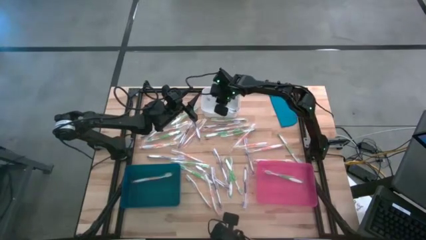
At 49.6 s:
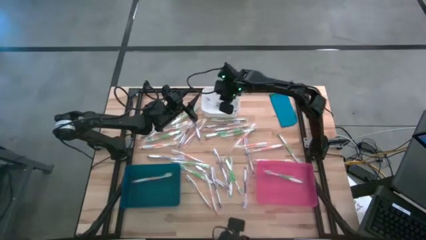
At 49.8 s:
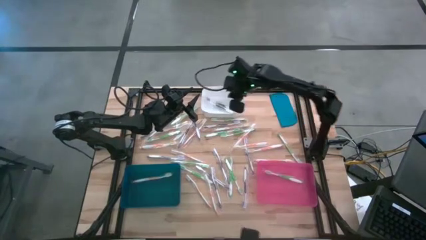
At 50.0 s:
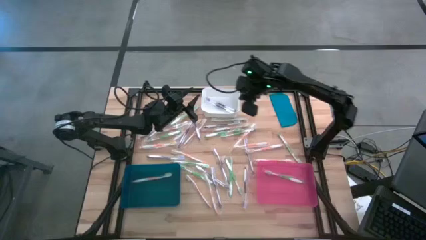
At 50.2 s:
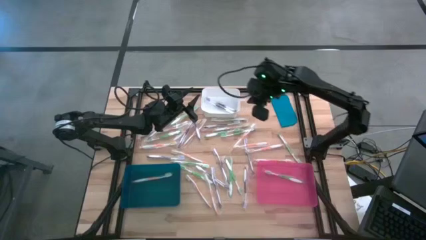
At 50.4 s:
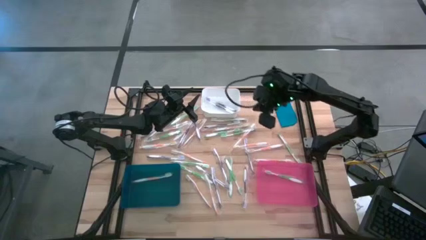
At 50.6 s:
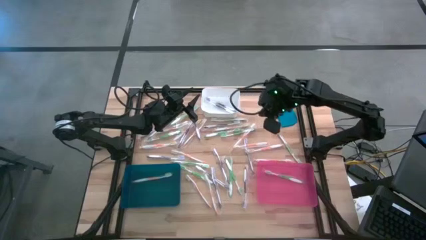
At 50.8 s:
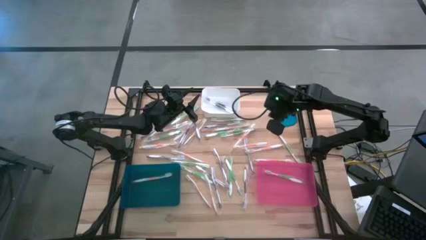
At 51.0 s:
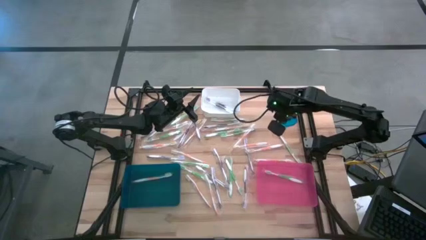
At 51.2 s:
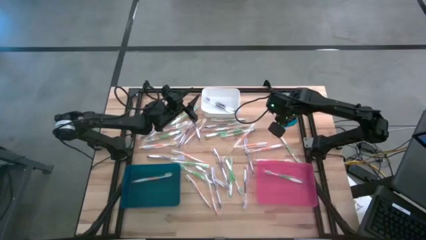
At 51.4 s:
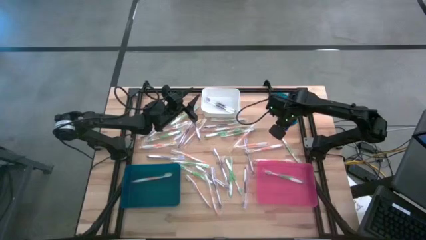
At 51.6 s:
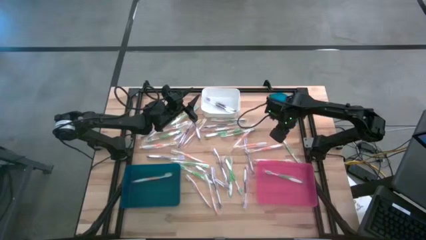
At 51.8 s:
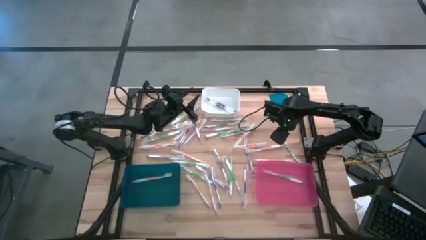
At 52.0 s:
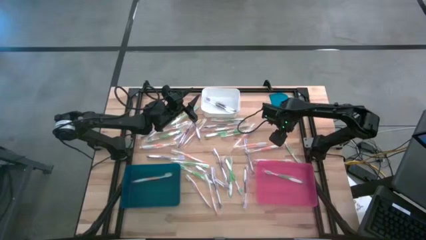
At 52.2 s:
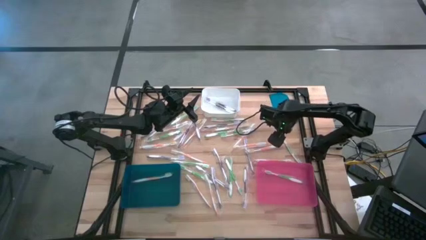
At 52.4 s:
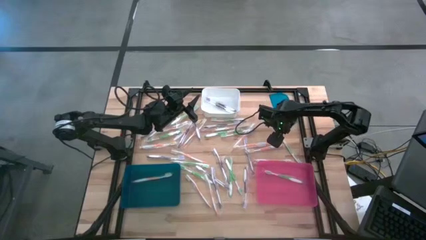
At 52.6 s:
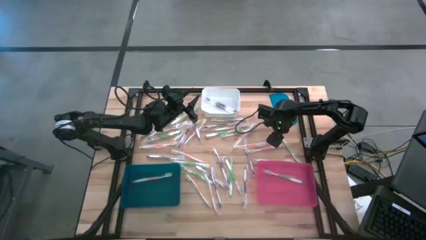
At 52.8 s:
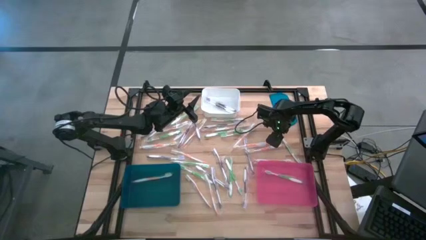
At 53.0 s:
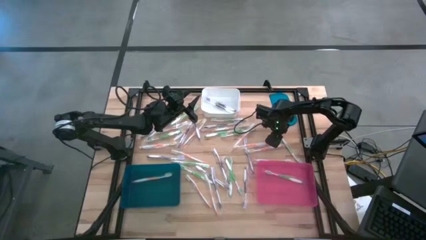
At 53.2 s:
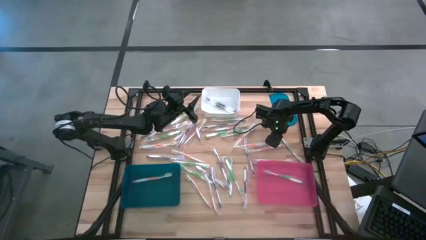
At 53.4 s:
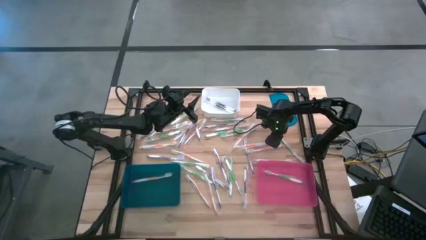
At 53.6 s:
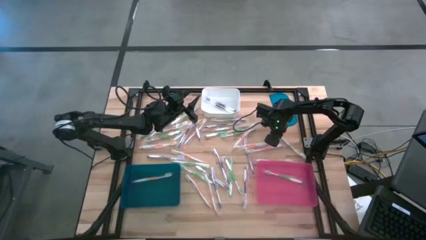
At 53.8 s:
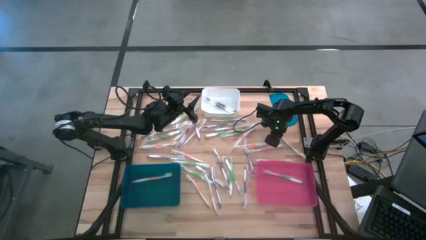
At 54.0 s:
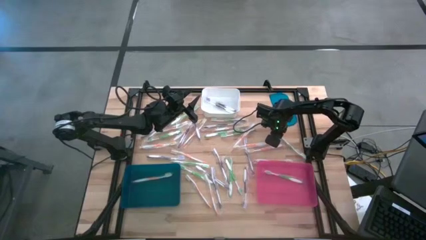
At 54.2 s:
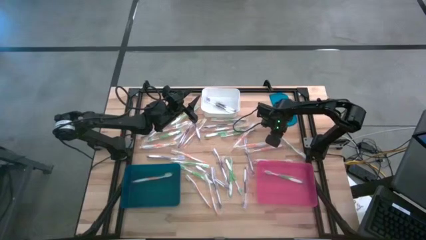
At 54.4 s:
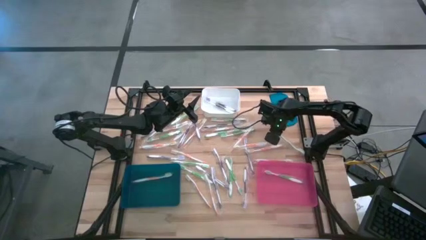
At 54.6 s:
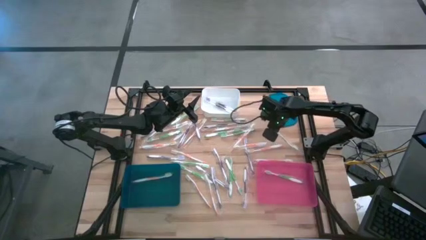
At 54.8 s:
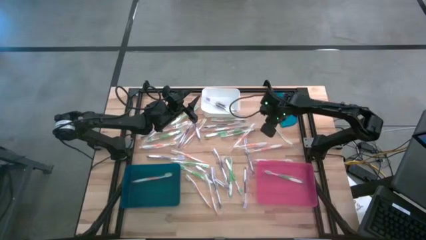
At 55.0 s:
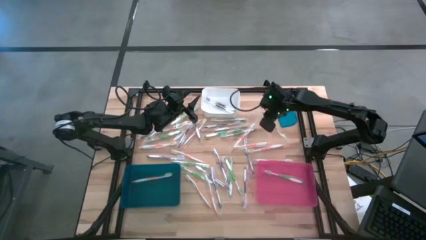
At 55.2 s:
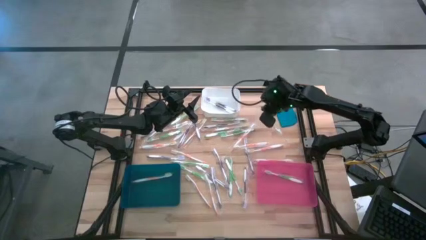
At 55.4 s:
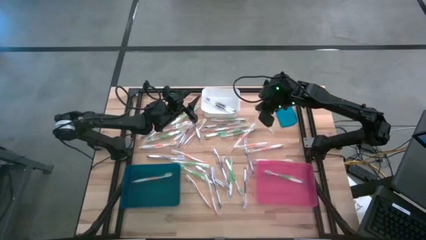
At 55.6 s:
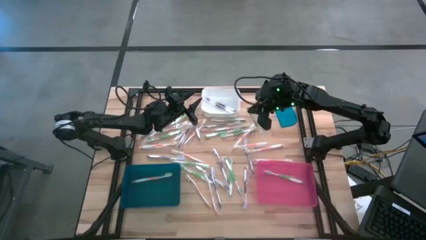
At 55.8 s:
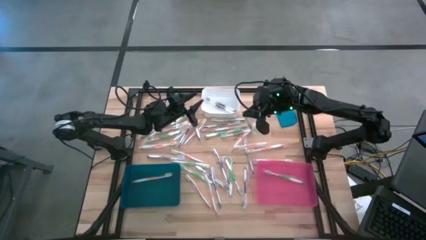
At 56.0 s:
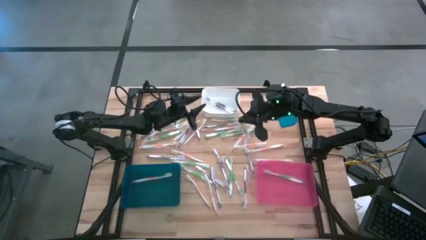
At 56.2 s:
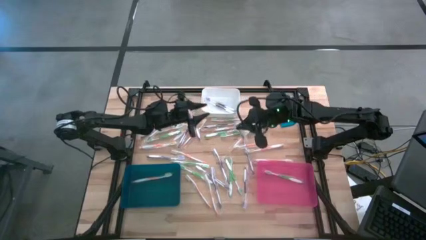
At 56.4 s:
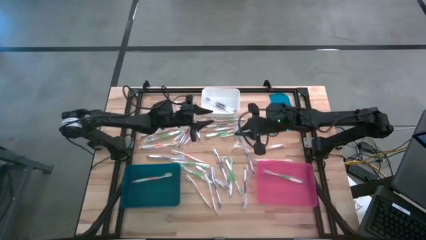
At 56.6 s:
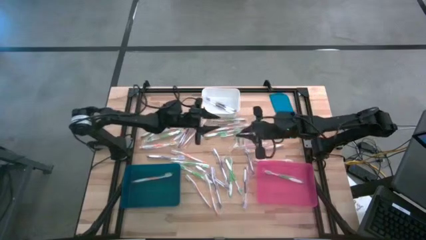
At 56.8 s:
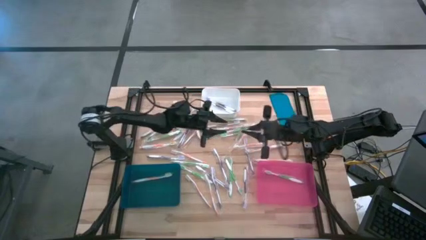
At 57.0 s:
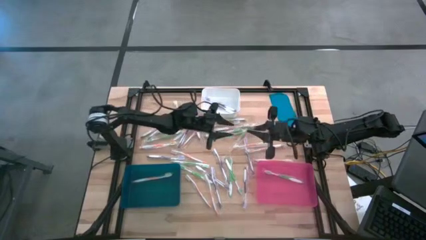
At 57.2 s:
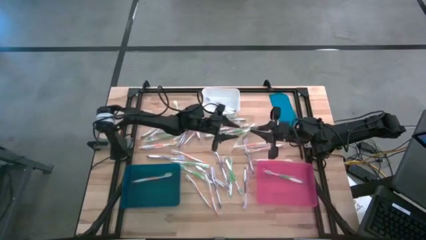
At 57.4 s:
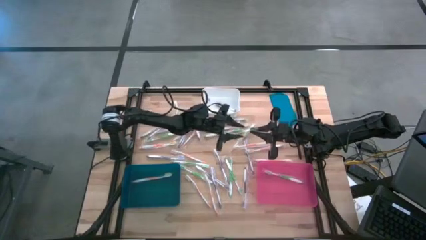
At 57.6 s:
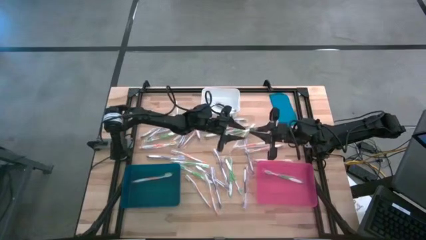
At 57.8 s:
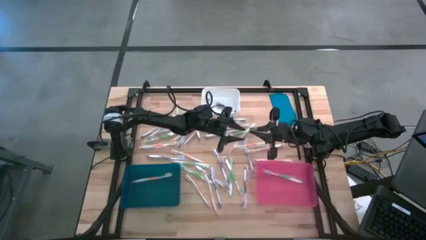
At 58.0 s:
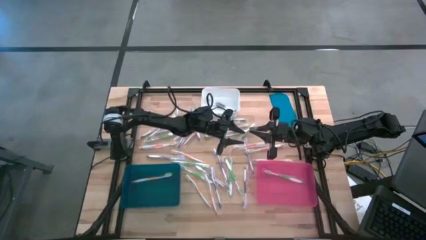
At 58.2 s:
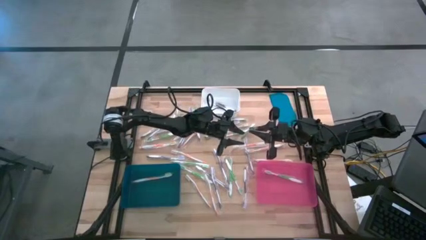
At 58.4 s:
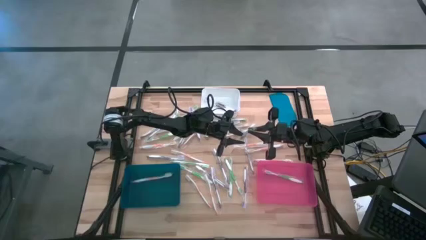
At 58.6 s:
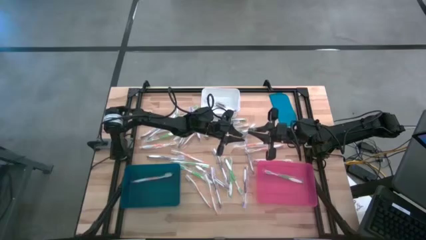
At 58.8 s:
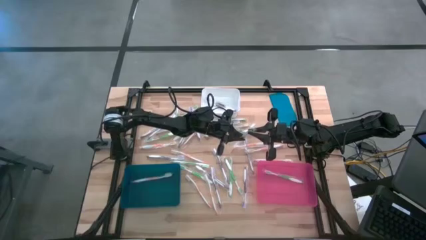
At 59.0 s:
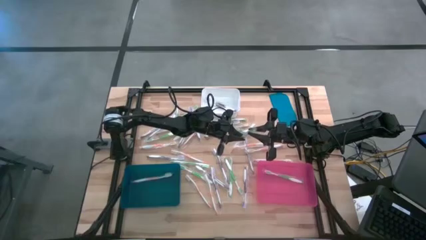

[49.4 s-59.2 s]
Task: Pick & Place Toothbrushes
Put the green toothbrush into the pink bin

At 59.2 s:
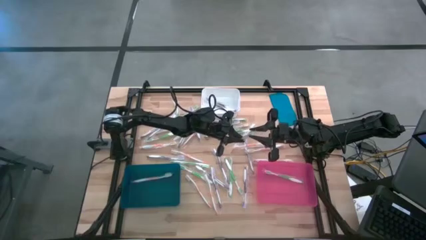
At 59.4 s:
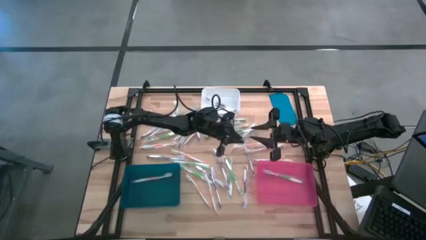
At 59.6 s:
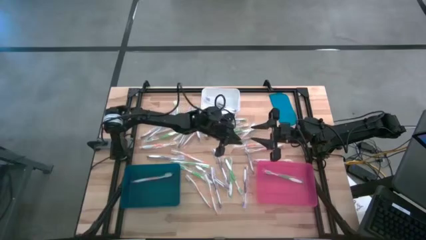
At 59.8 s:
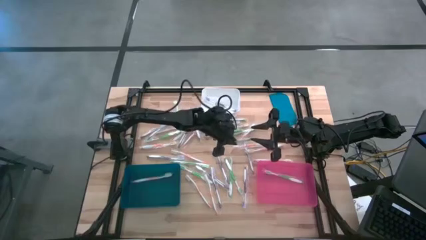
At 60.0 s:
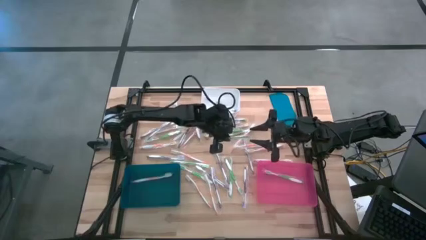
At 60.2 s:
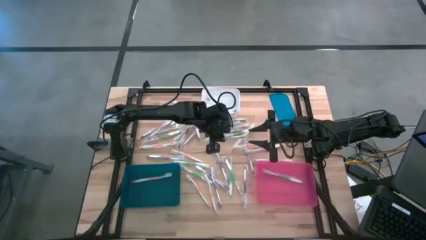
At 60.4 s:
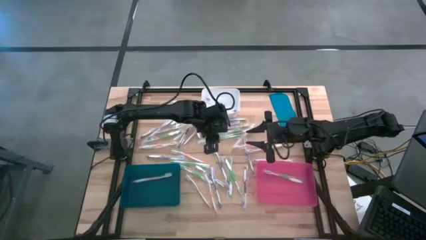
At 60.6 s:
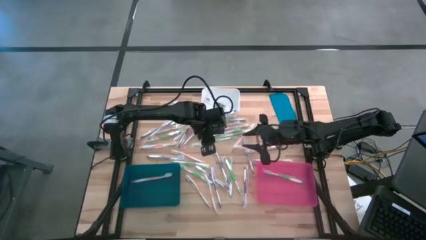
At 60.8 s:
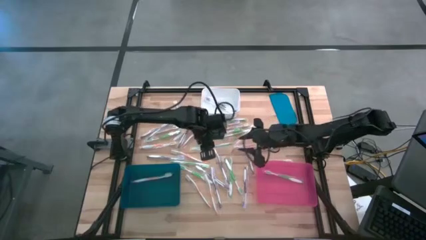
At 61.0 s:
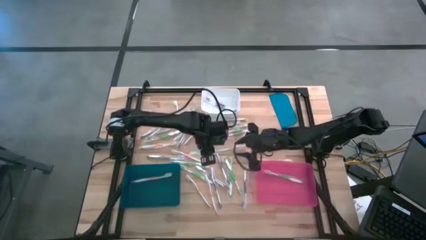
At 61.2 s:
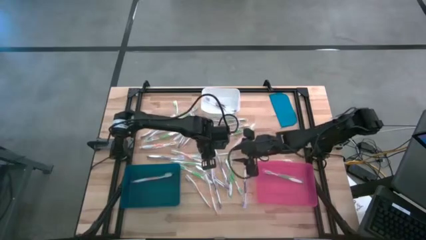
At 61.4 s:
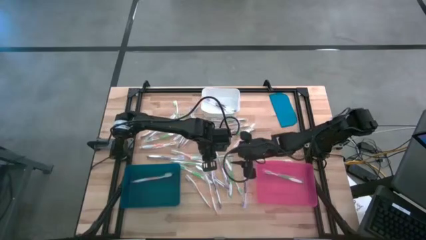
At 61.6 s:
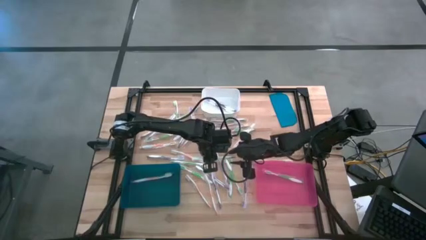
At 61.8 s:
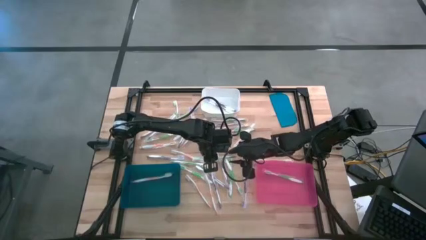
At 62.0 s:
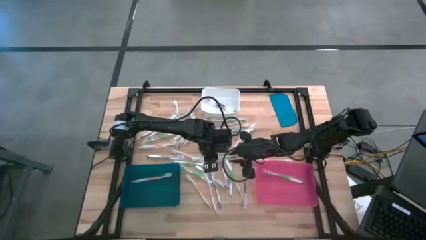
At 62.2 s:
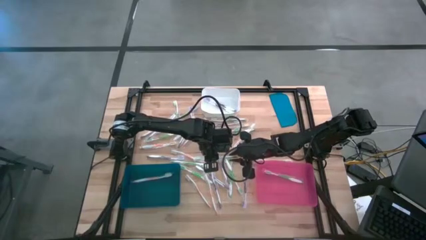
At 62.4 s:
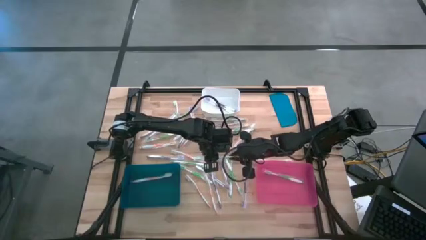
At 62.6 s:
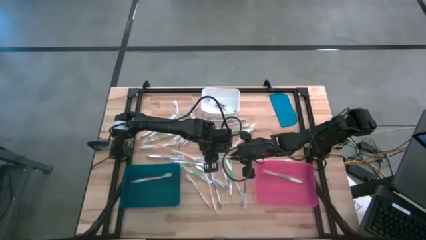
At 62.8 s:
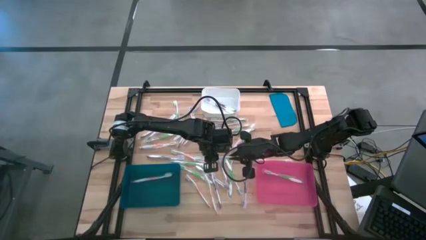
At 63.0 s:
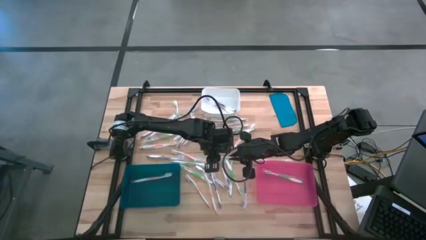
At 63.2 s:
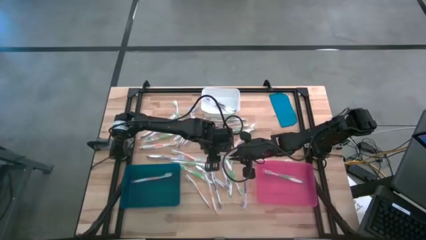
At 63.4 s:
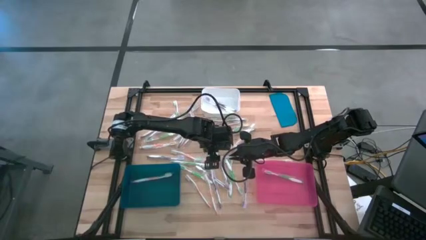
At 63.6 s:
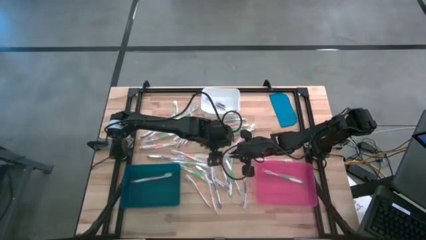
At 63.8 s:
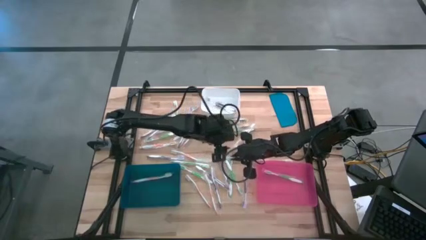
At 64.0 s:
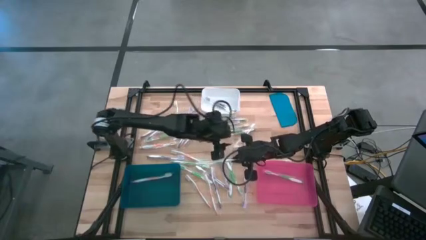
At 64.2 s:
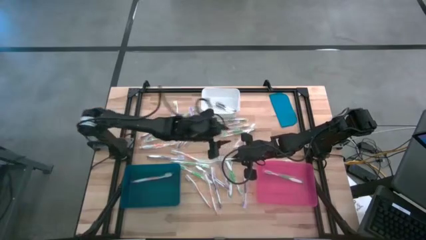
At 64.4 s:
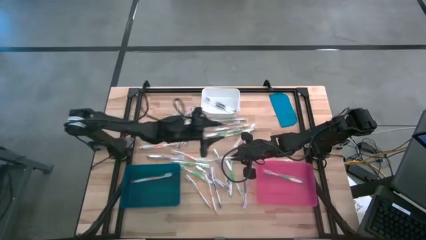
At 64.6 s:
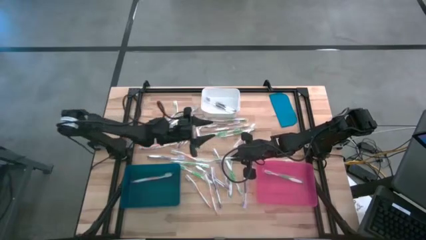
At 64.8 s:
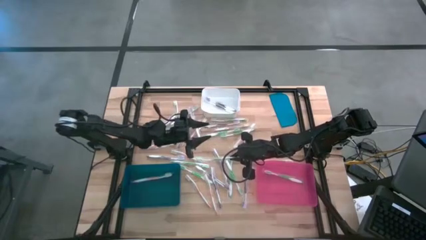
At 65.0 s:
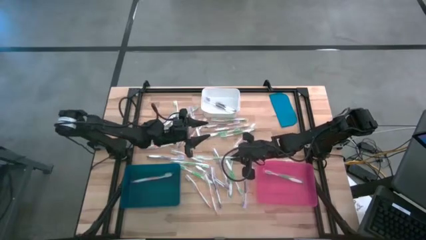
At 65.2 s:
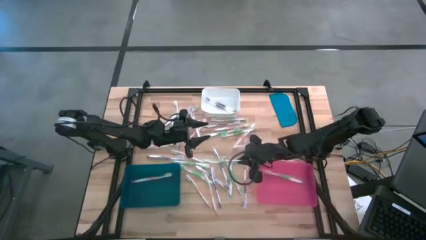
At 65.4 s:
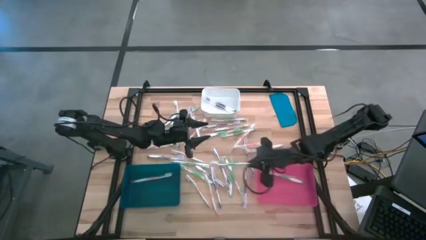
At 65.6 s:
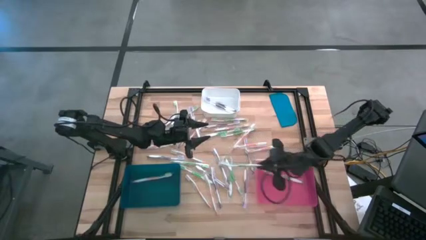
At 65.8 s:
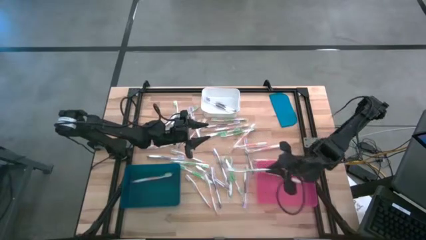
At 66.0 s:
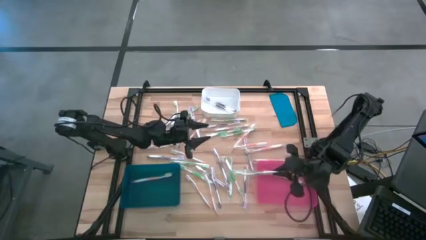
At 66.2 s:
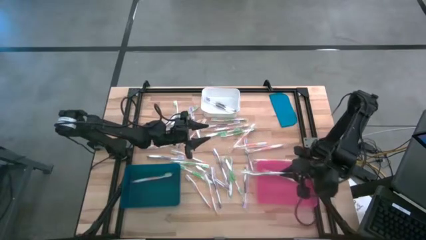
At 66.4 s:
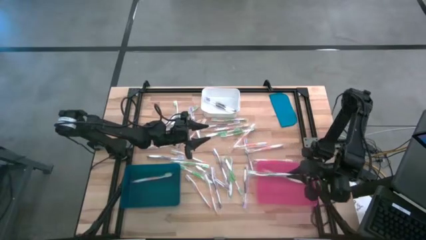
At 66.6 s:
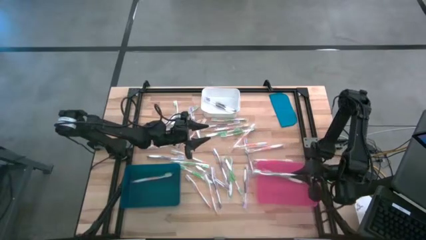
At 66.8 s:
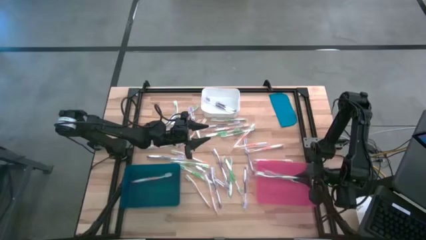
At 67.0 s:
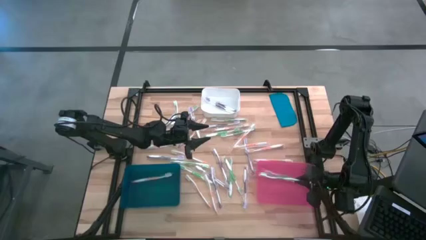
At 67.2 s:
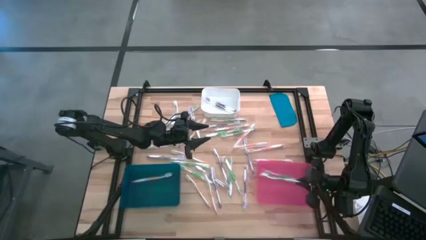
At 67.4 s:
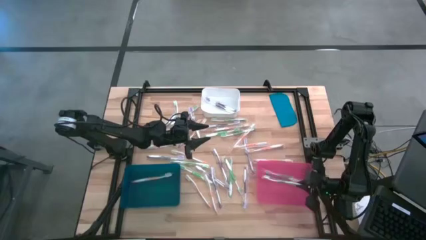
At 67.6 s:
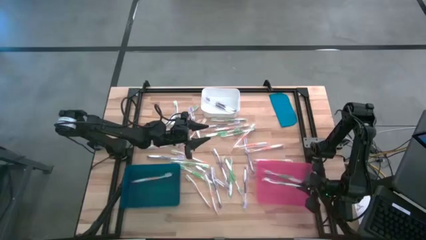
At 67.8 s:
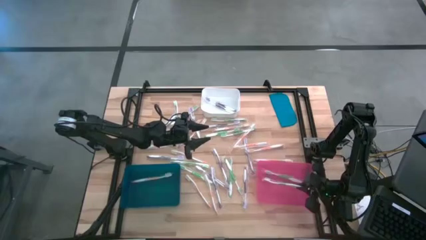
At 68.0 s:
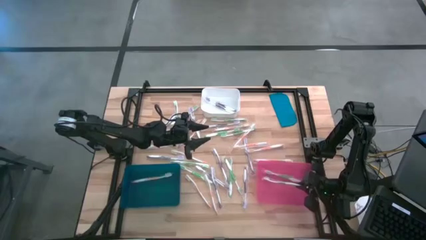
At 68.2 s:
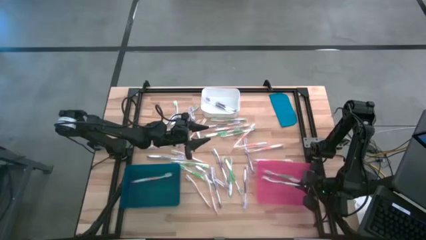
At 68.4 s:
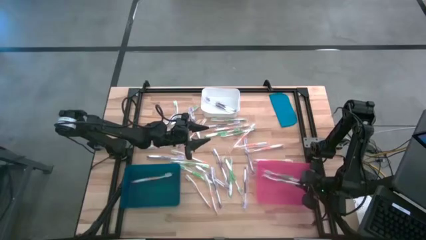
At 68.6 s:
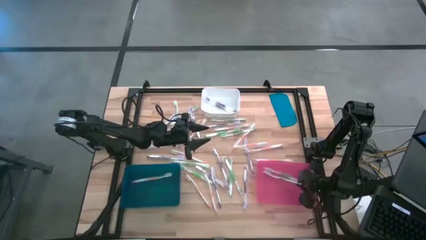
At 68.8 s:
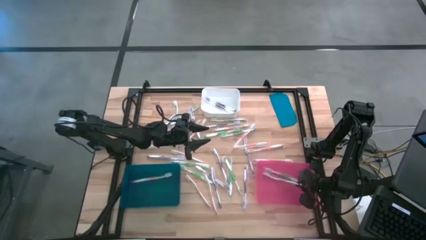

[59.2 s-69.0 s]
Put the green toothbrush into the pink bin
